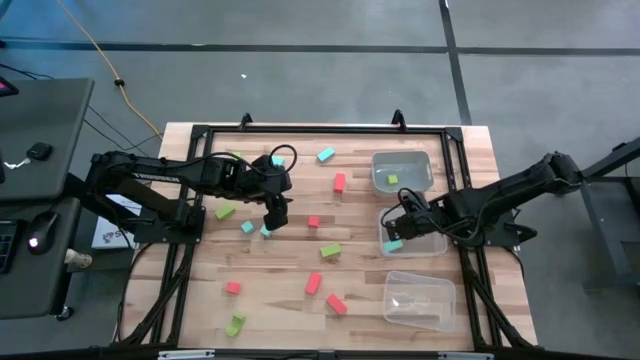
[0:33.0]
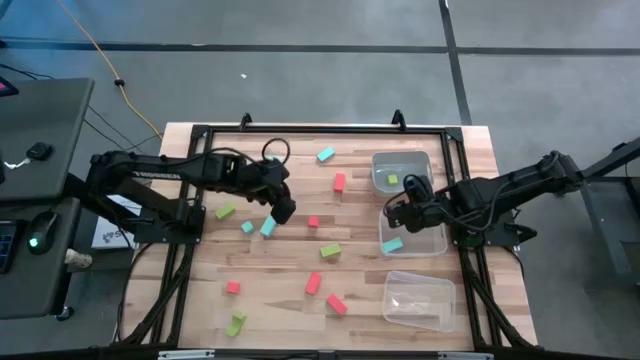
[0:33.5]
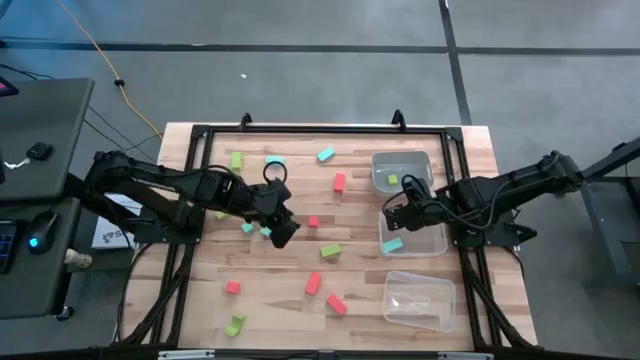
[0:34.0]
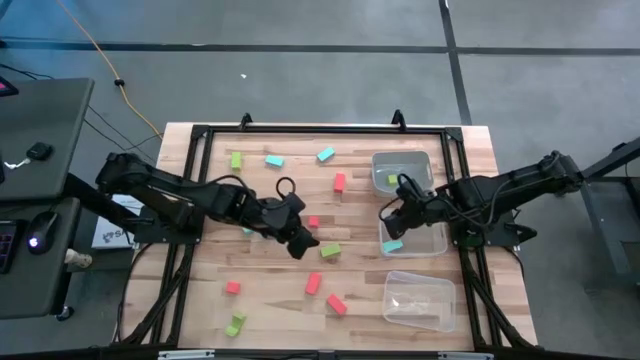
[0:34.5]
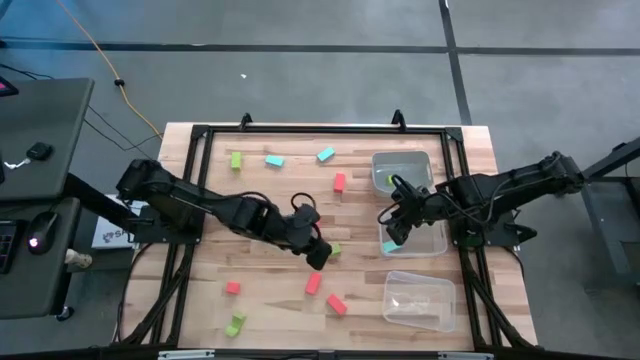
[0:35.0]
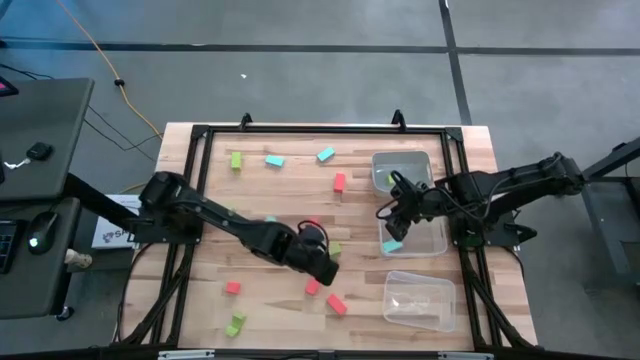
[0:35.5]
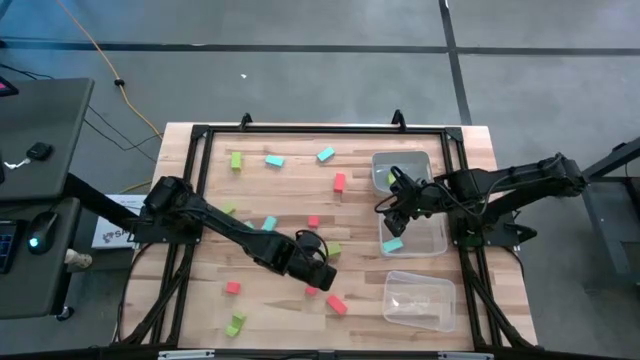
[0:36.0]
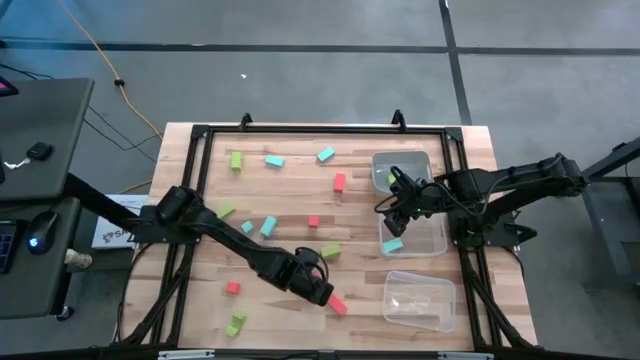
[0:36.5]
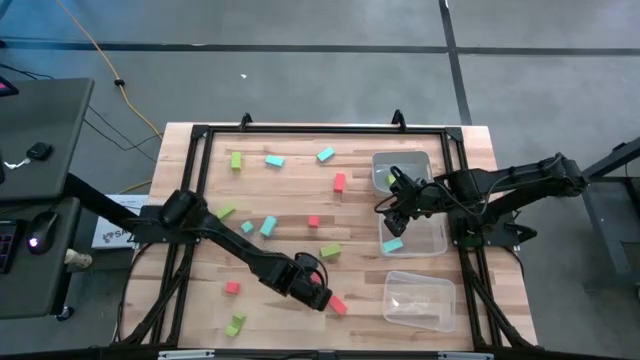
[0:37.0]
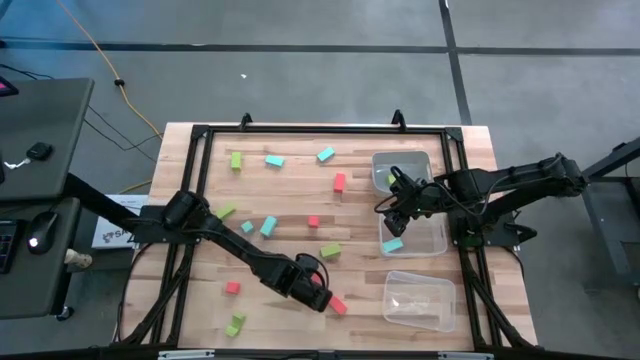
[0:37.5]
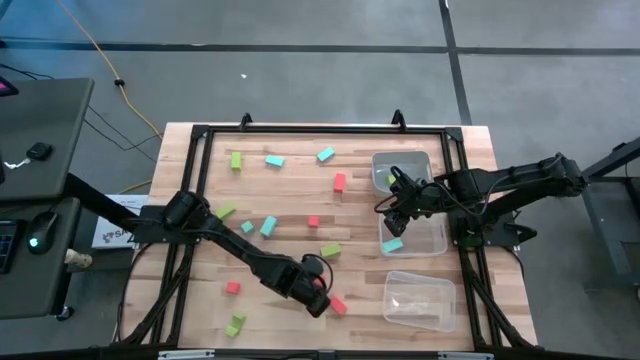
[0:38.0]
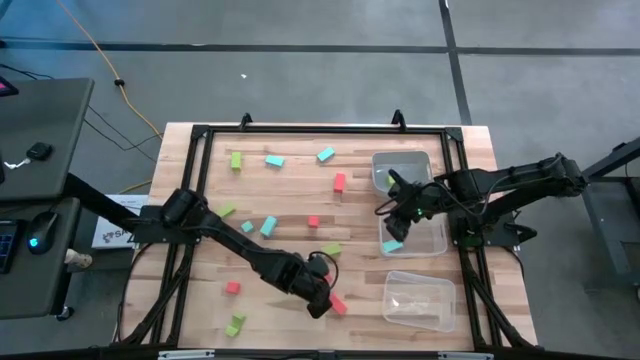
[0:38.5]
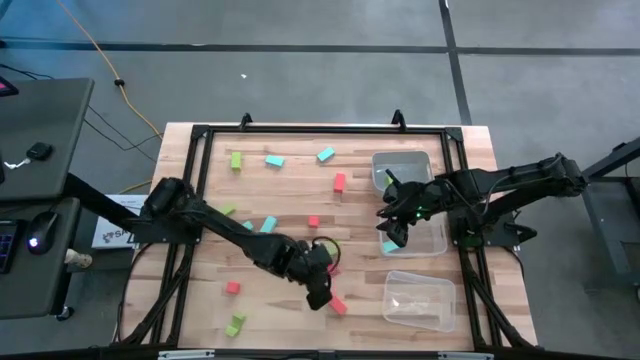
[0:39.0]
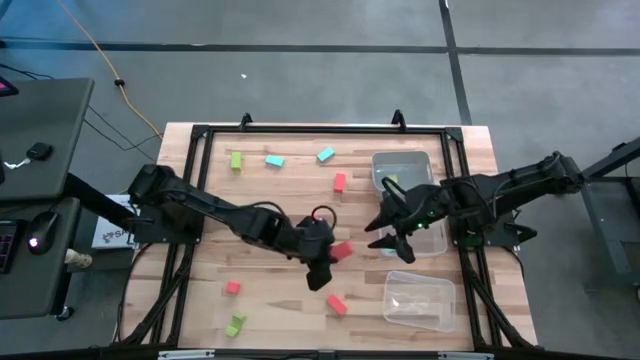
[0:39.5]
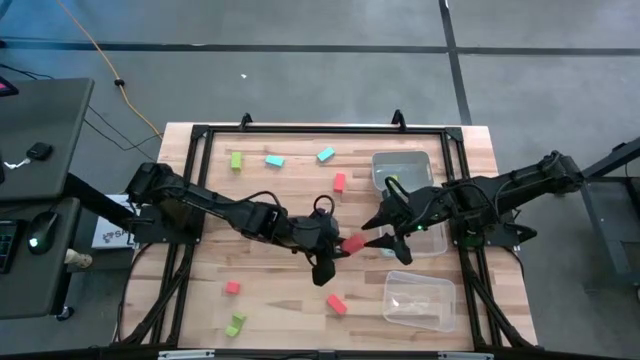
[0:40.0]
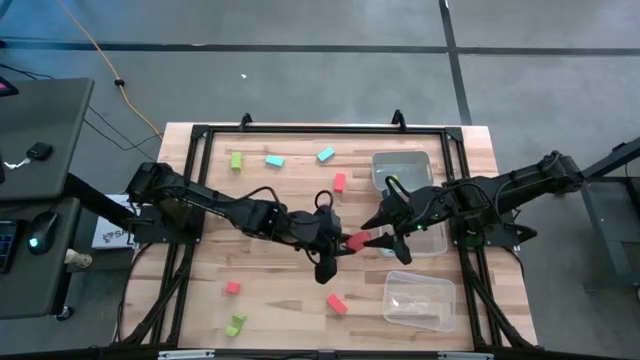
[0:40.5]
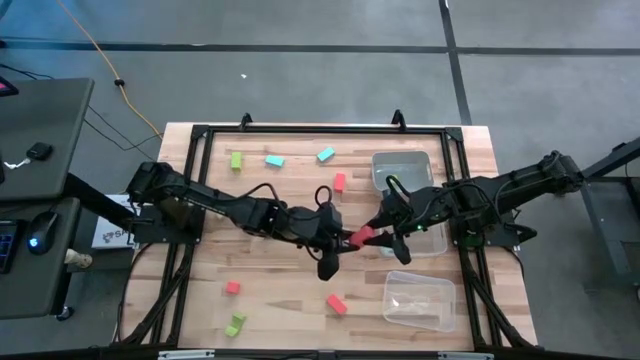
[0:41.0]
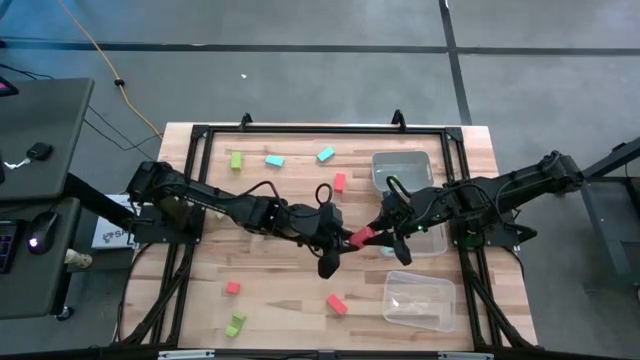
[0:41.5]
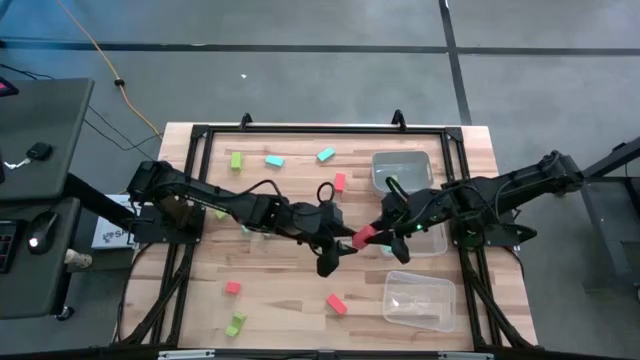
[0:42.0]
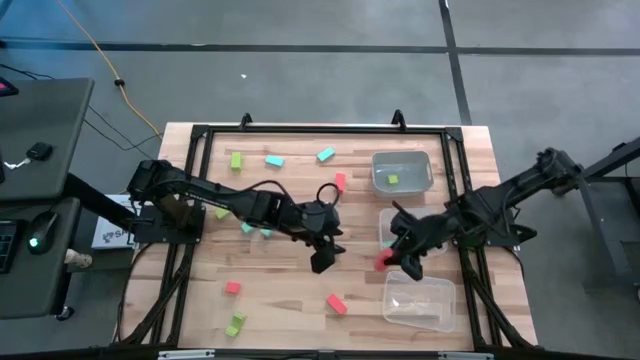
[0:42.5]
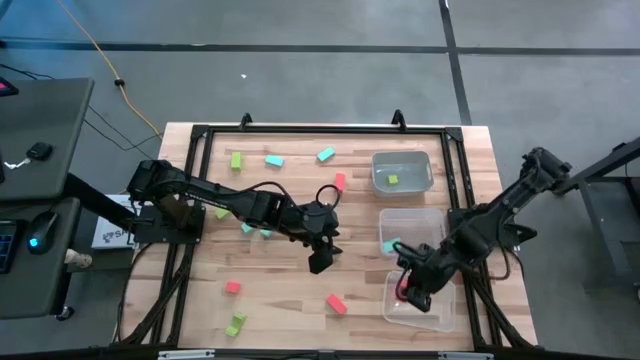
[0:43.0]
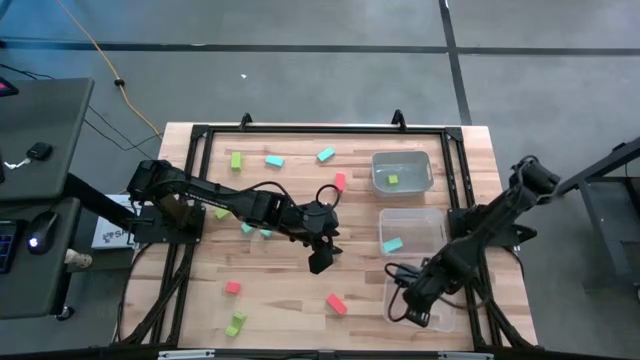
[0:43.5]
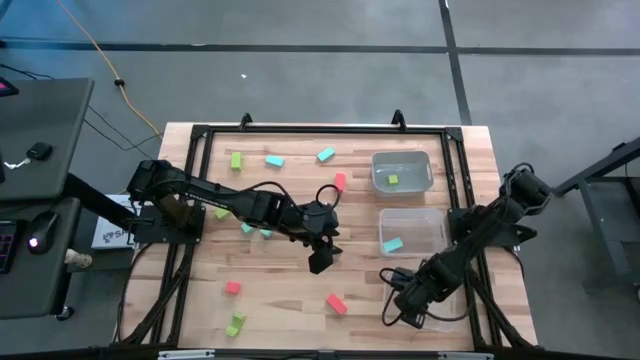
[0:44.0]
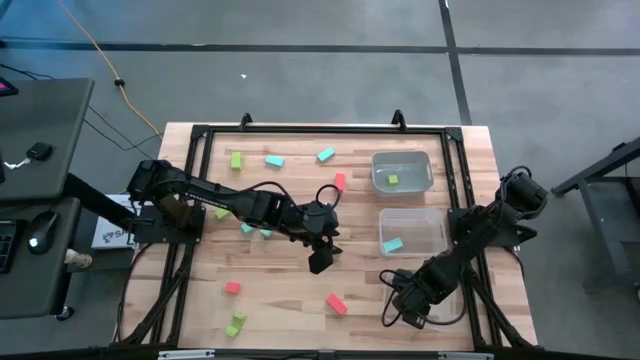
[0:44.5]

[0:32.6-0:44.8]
Task: Sort & place blocks by color
Put the orange block into the bottom transparent bin

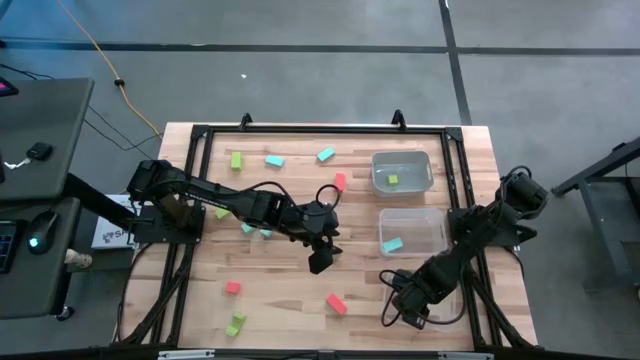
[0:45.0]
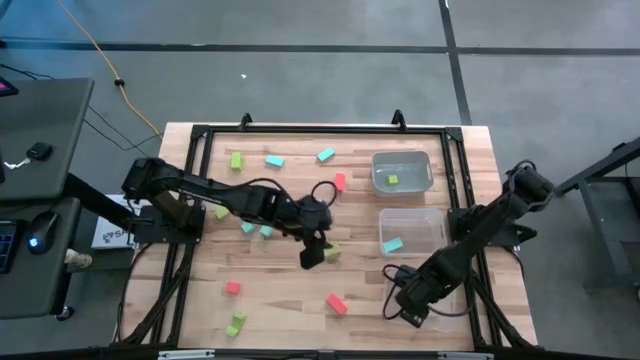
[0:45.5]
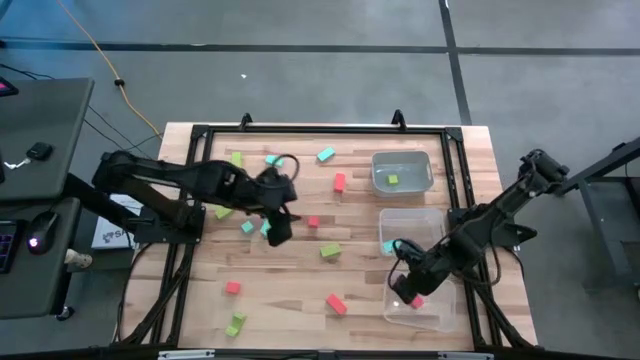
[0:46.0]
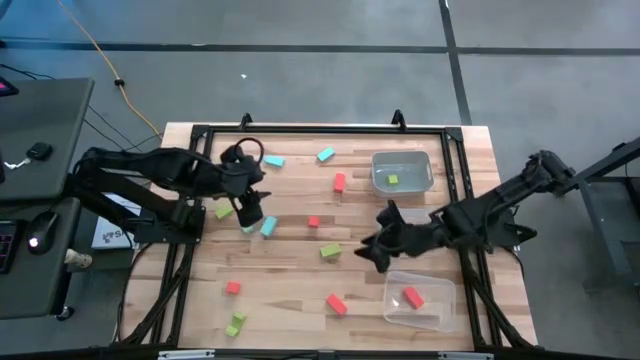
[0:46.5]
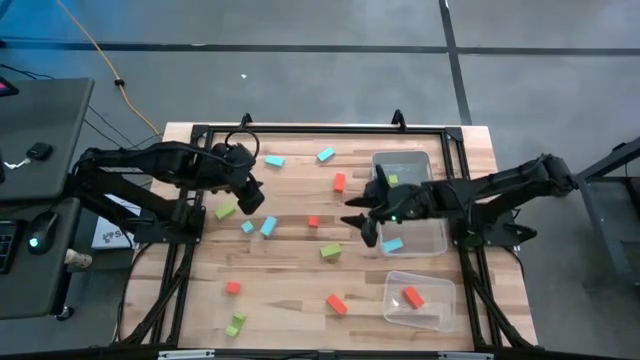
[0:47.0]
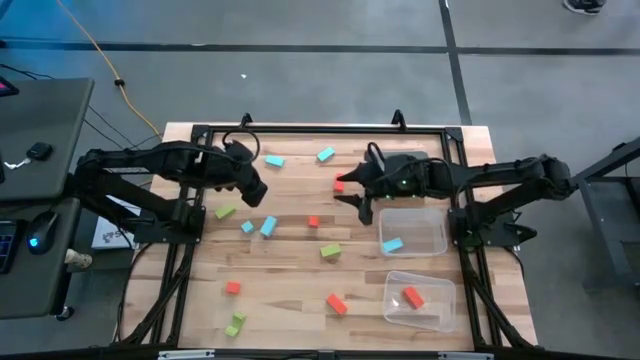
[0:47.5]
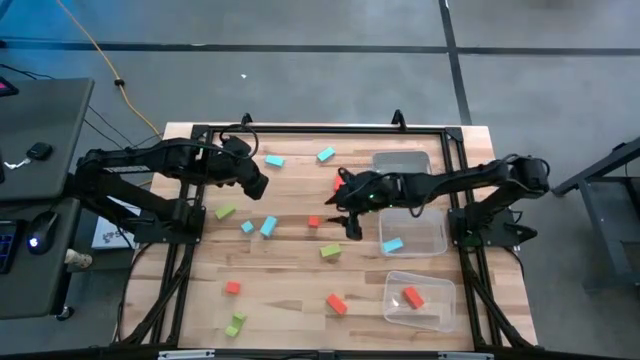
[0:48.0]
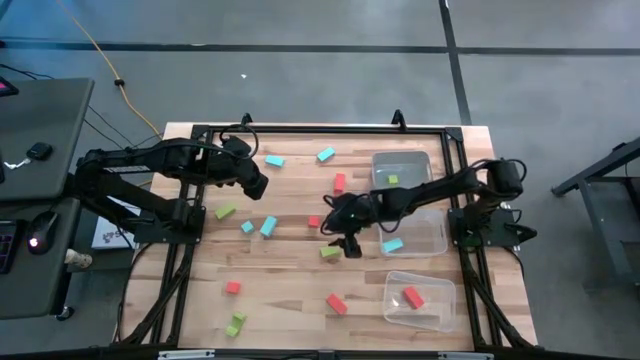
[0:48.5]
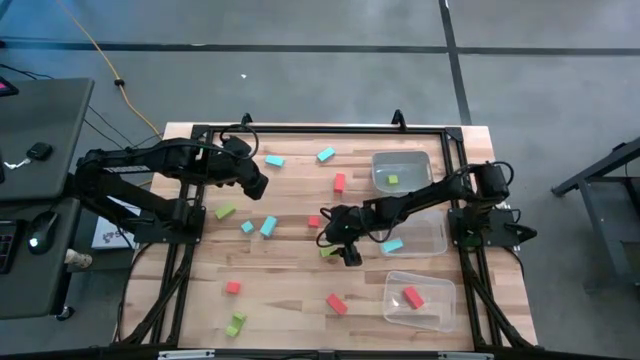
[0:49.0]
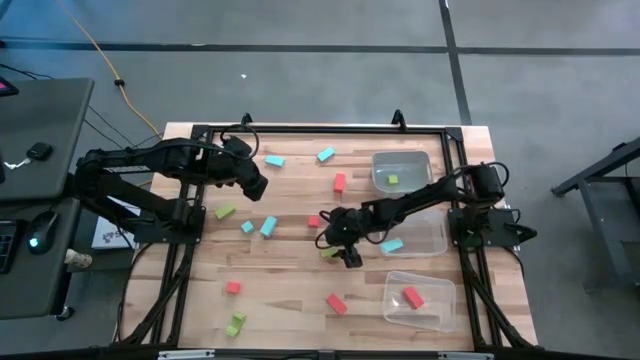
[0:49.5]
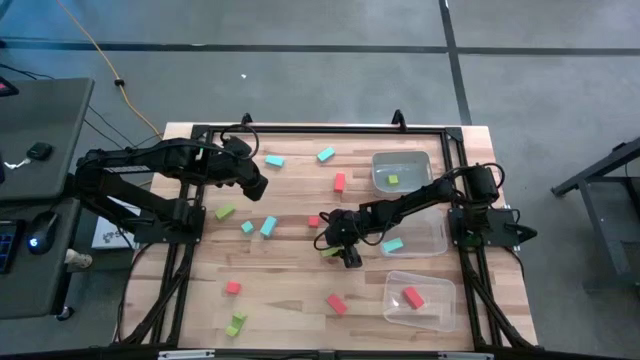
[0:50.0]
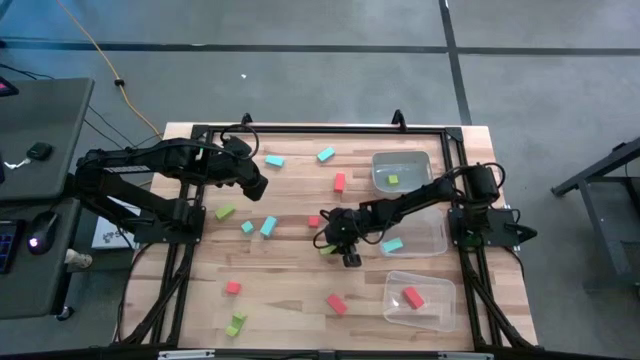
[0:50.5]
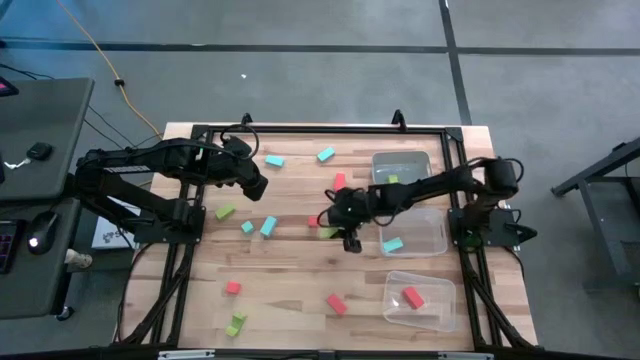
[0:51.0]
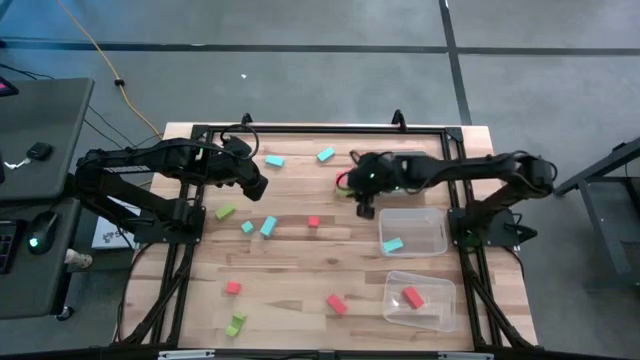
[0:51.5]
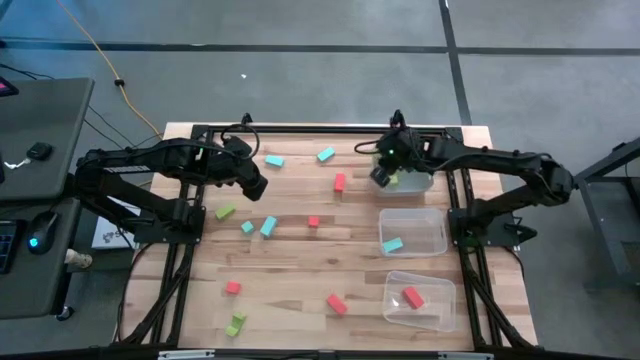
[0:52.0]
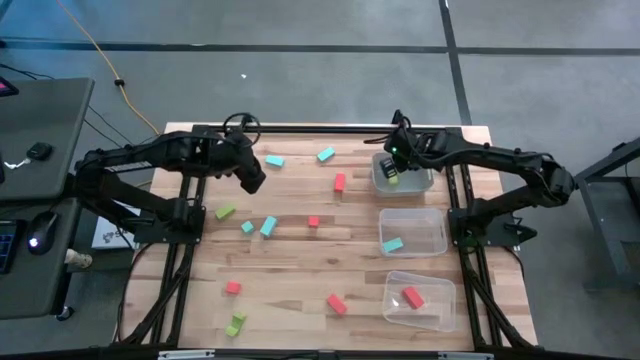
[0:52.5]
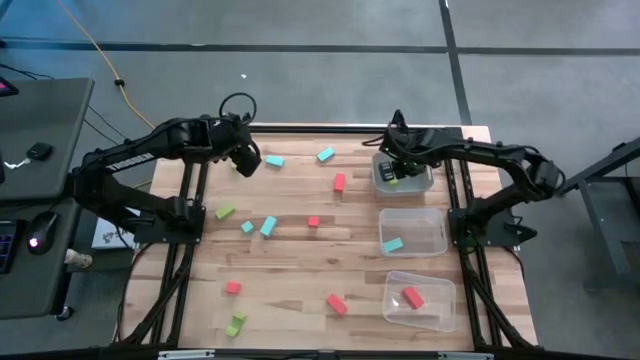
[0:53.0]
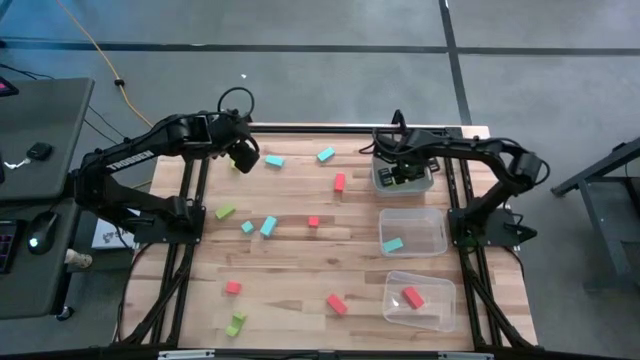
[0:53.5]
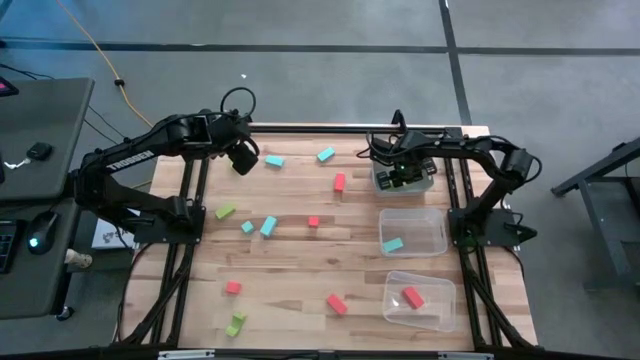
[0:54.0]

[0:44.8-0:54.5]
Put the light green block into the gray bin
